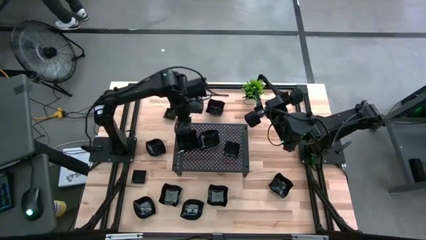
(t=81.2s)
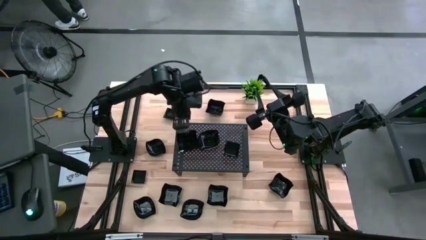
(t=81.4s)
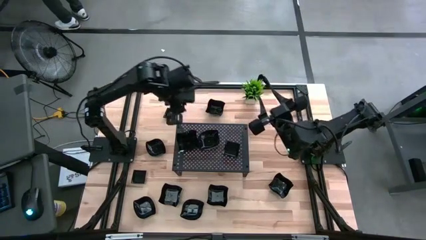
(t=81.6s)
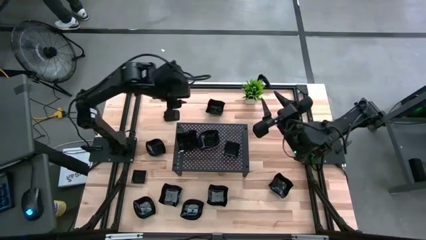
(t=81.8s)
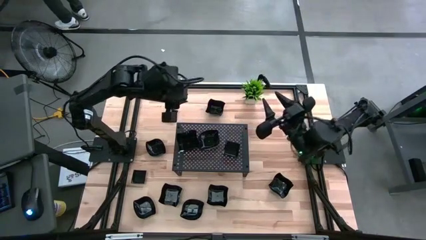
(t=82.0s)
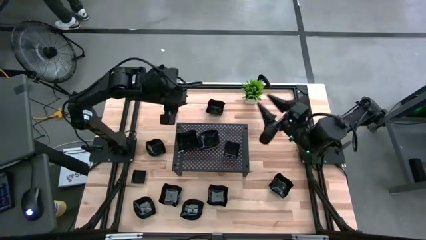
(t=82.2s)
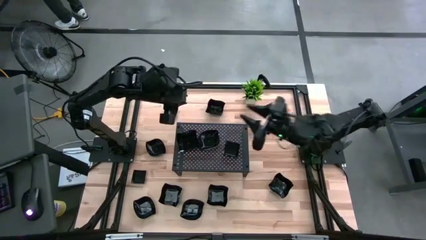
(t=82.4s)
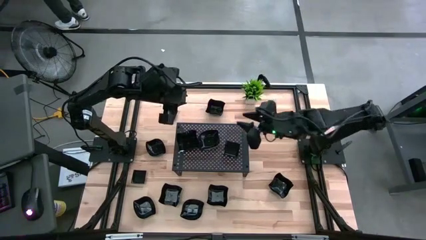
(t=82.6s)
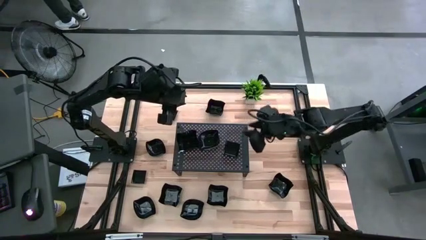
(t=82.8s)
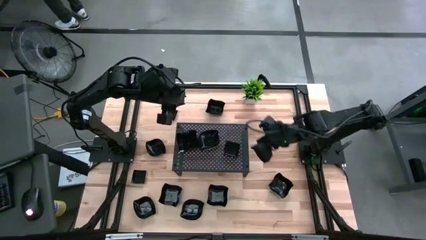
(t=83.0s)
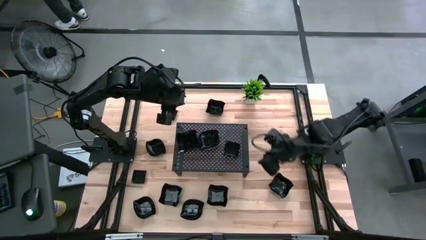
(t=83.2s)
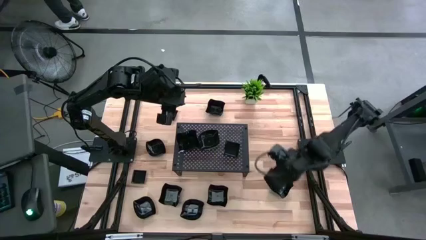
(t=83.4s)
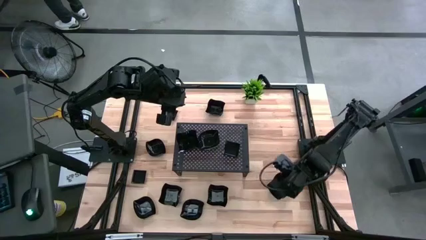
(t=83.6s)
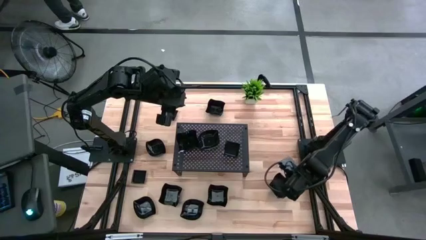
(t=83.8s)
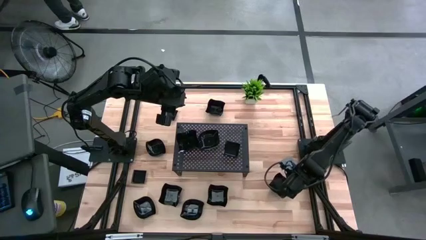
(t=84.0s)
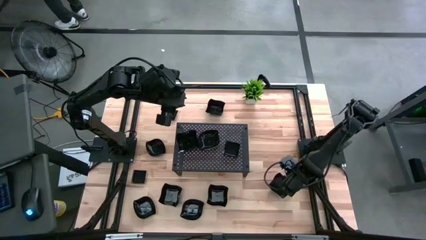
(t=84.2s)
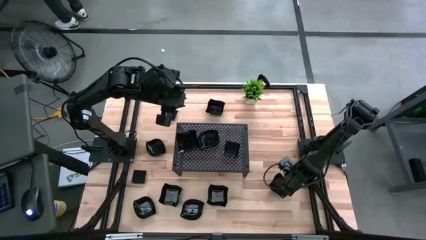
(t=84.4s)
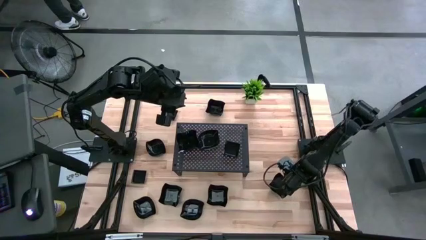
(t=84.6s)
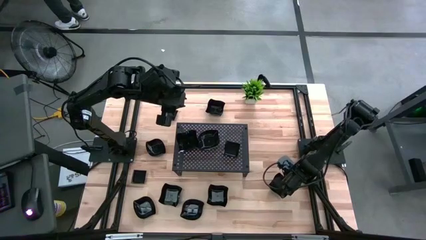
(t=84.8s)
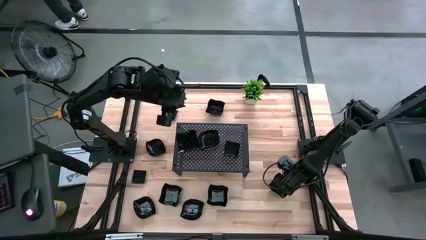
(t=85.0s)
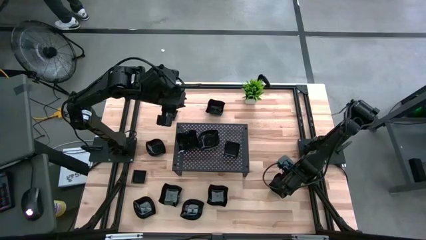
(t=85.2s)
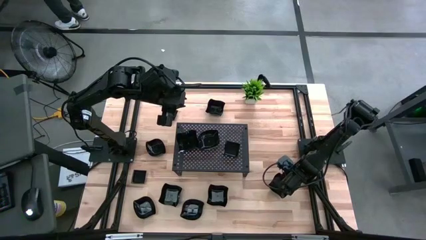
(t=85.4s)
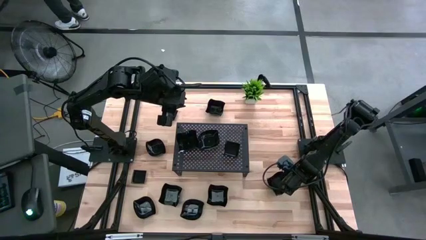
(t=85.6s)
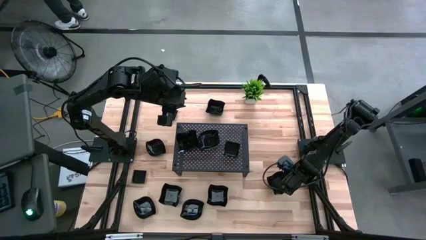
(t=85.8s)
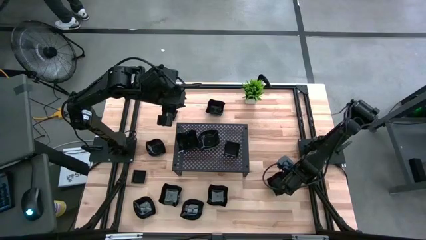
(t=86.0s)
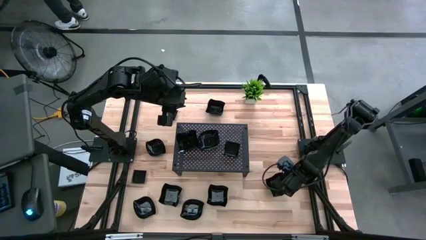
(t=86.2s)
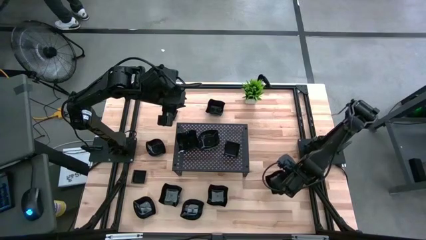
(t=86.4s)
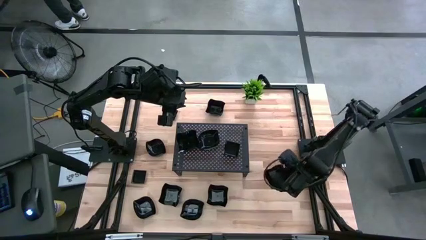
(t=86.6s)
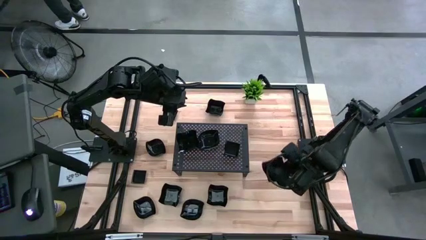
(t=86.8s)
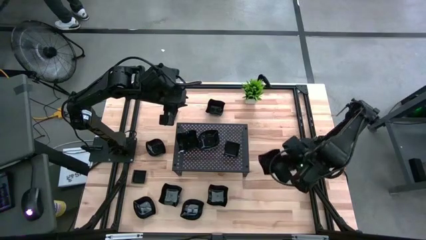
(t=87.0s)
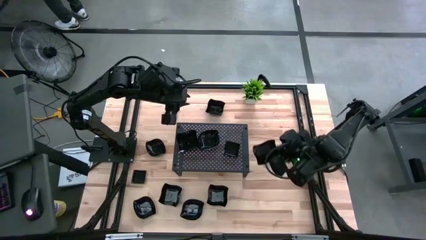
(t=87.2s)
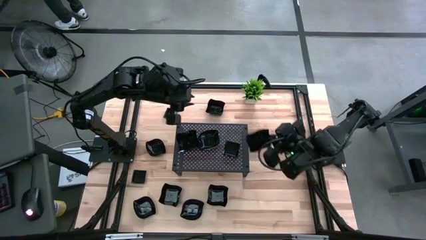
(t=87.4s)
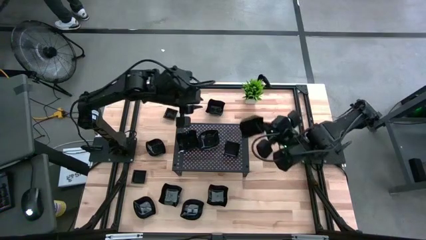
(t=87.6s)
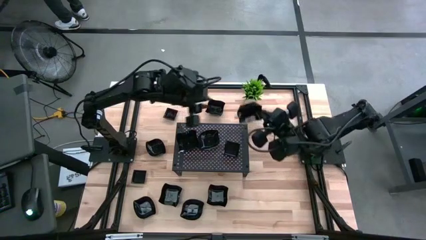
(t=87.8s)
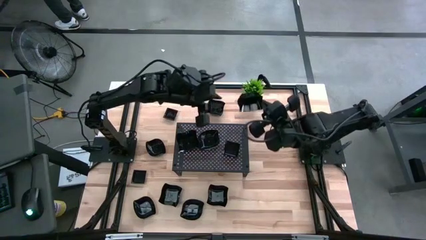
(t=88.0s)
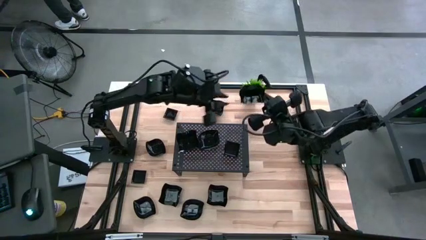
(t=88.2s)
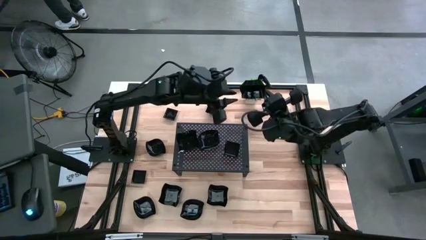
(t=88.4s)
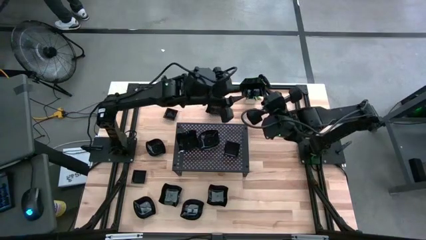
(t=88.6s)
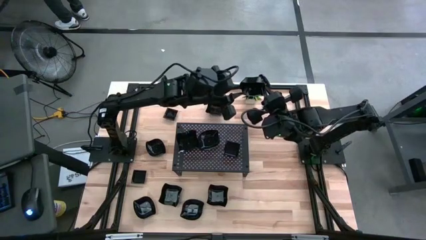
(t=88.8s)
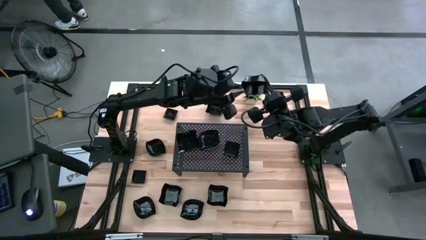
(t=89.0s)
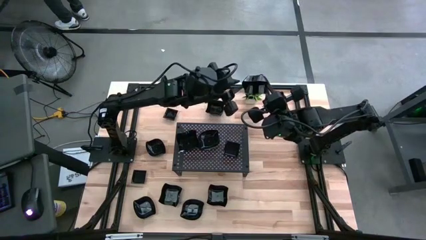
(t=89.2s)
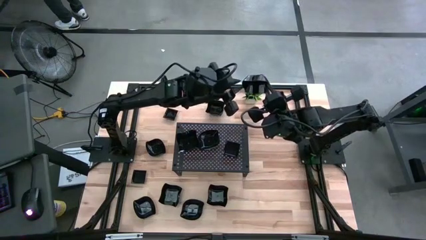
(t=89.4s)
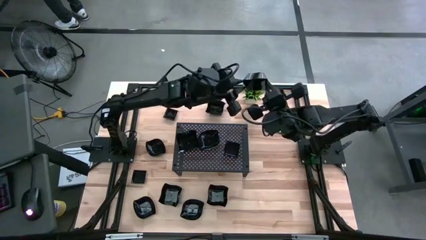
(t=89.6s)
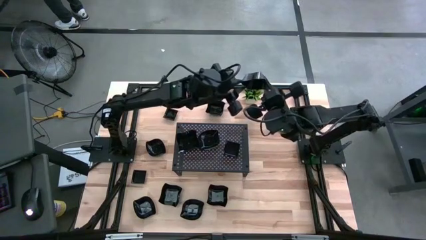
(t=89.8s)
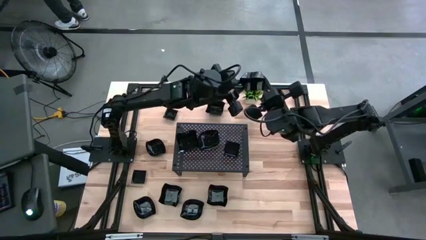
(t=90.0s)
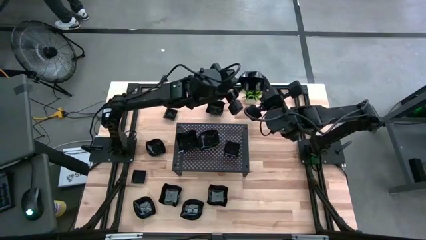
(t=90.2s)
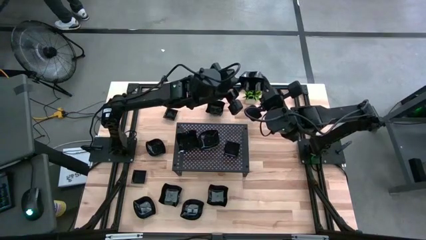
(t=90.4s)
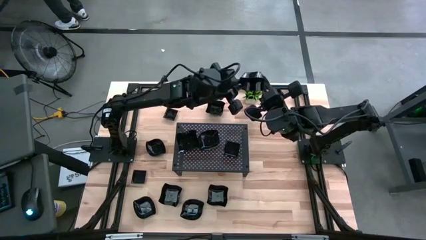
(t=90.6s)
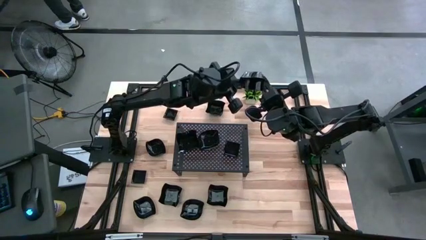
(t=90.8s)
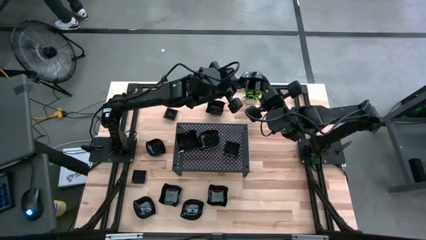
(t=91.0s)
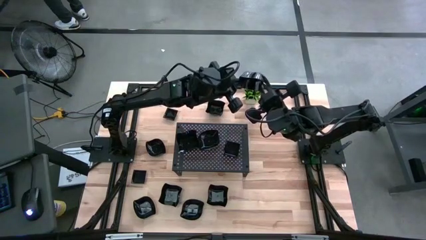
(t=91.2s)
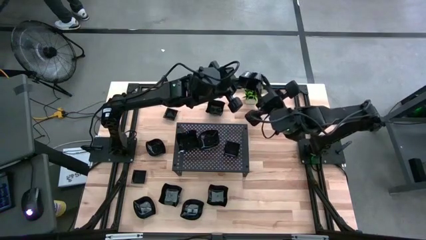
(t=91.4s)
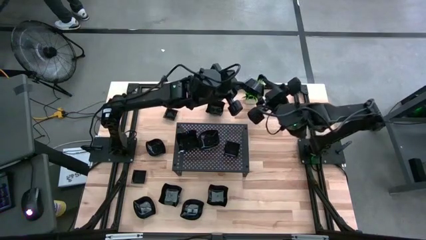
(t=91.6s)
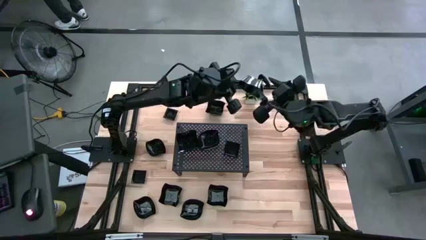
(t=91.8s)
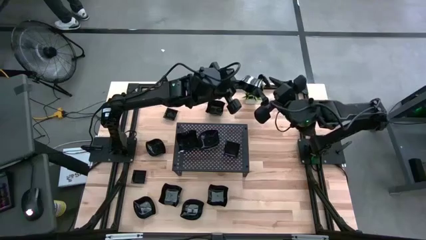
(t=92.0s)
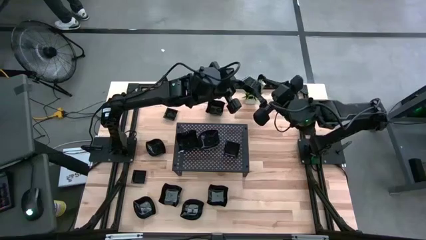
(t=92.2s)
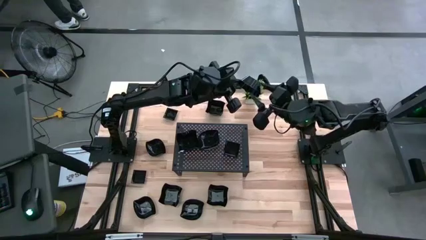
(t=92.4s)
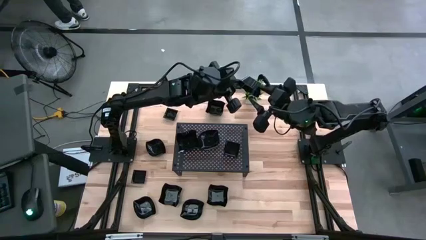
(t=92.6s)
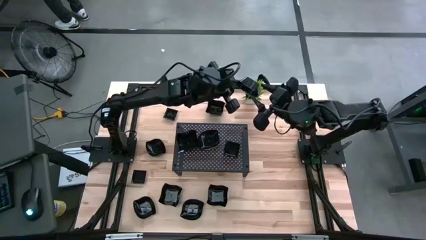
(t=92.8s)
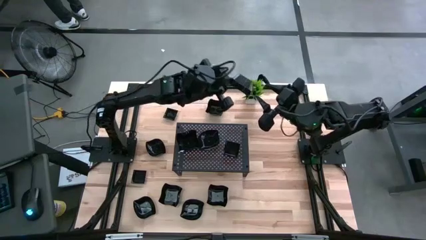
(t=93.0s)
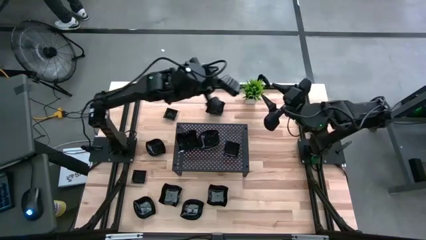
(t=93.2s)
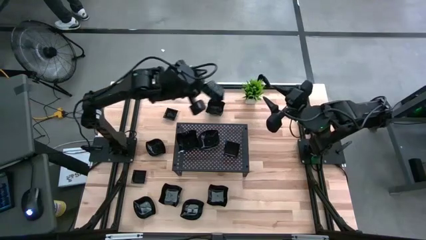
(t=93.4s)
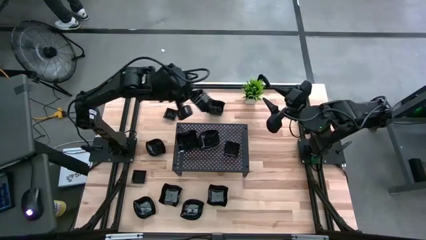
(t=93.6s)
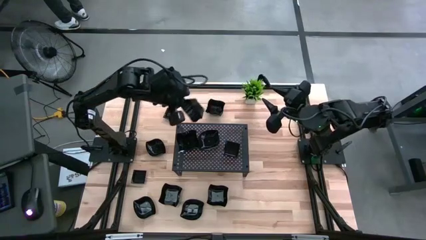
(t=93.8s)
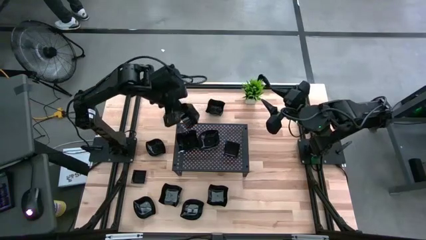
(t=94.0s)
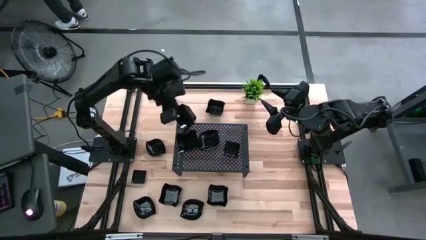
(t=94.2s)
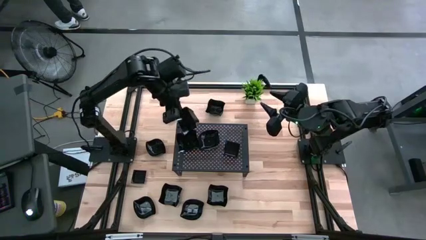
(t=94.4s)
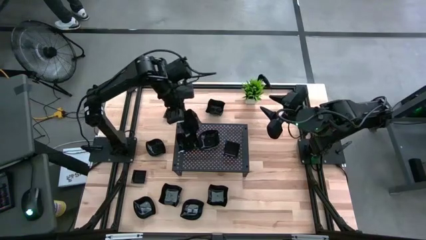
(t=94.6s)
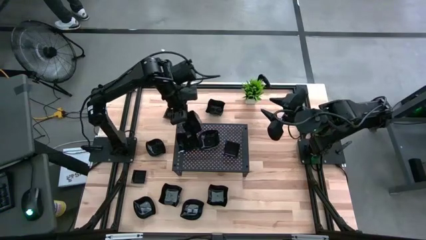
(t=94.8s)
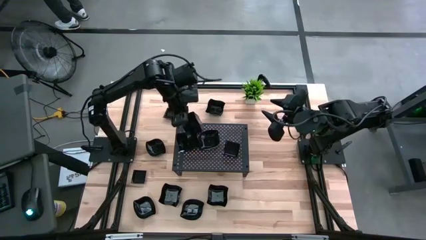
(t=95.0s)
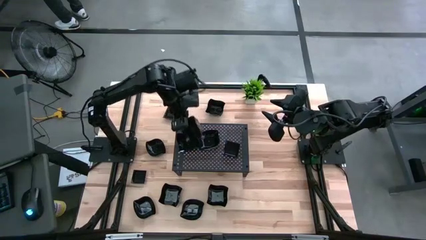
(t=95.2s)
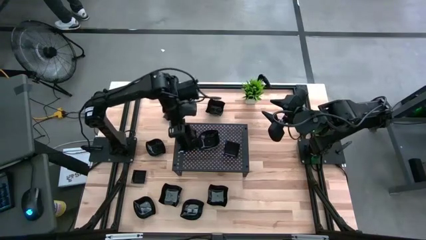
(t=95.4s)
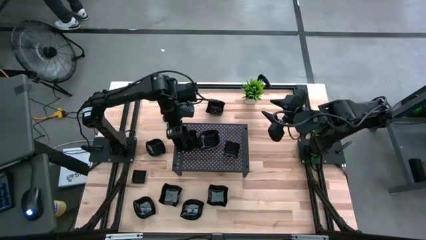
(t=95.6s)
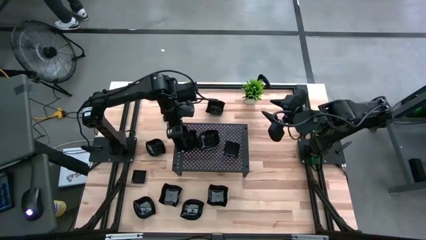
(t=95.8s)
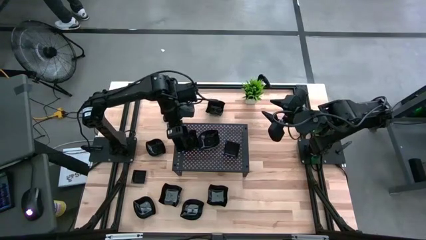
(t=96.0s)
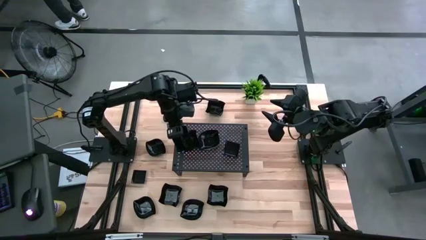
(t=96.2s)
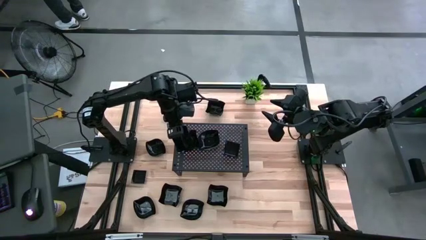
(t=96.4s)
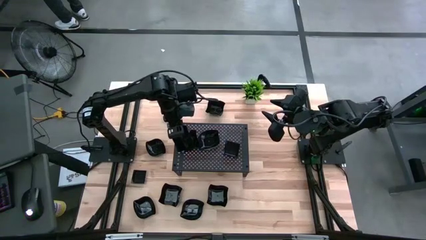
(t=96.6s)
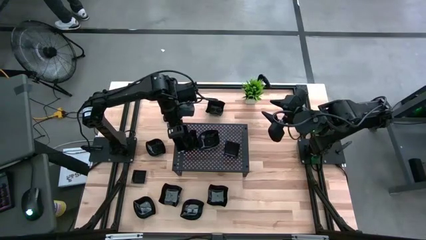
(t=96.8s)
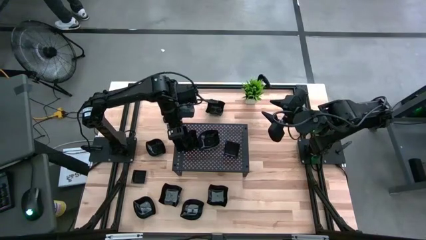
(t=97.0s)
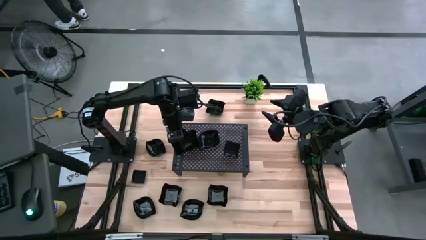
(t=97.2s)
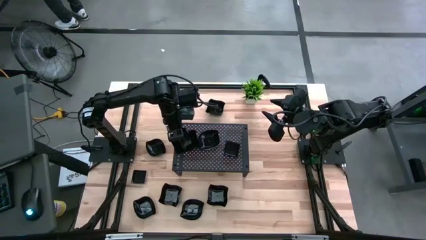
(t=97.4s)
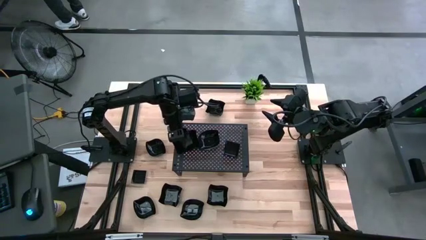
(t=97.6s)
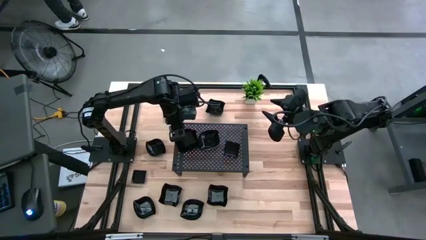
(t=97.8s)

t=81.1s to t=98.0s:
Task: Pick & Place Mini shaped plates
Stack the distorted square plate on top of the distorted square plate on the shelf
